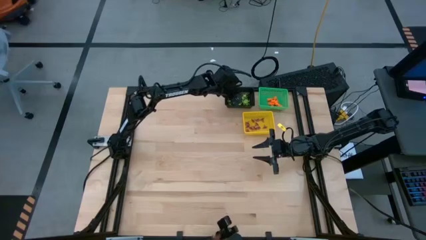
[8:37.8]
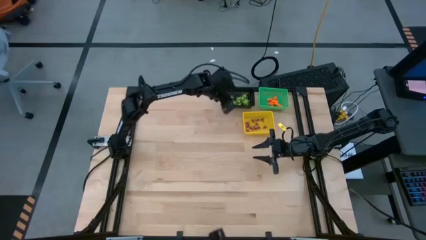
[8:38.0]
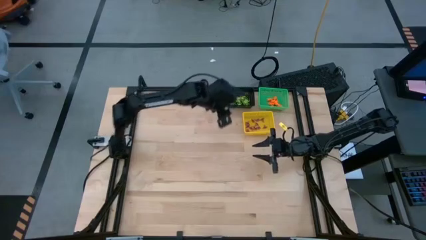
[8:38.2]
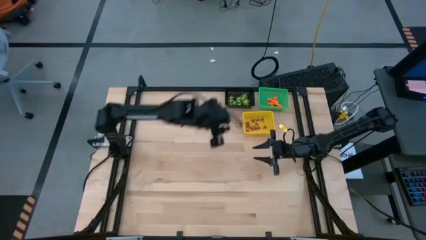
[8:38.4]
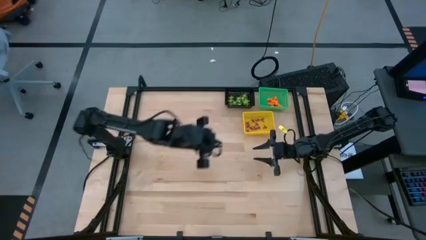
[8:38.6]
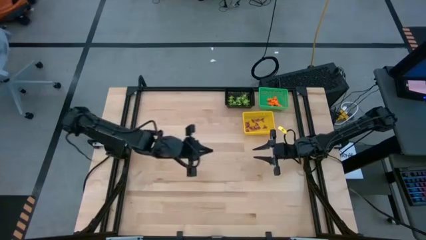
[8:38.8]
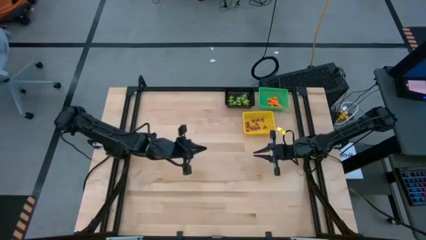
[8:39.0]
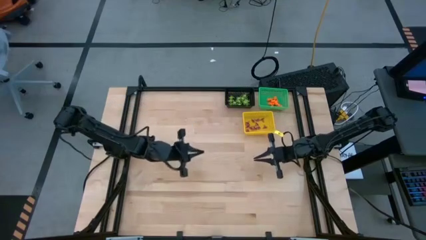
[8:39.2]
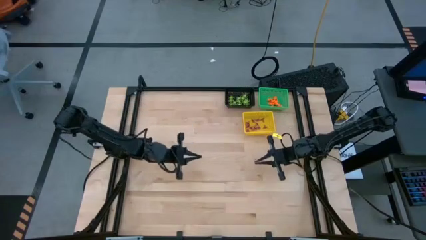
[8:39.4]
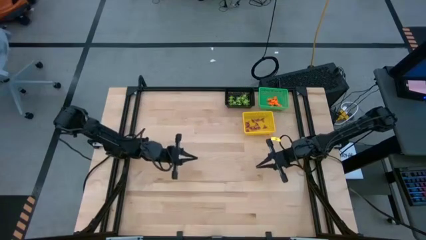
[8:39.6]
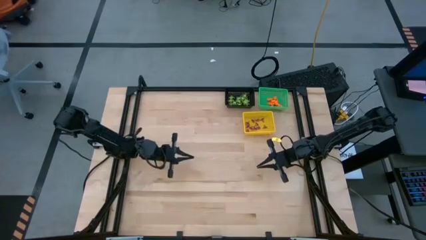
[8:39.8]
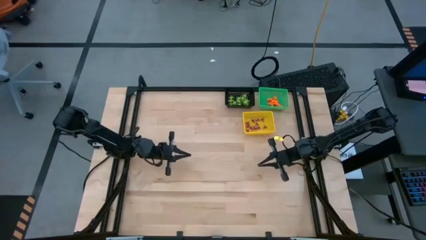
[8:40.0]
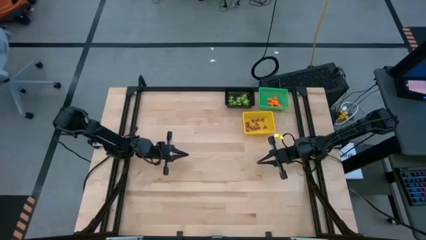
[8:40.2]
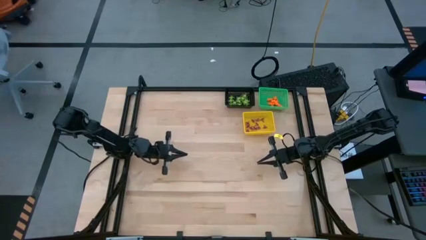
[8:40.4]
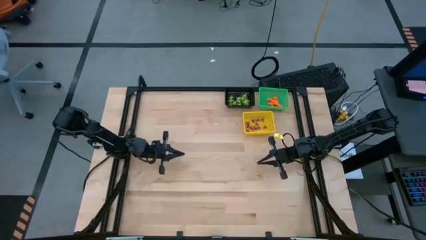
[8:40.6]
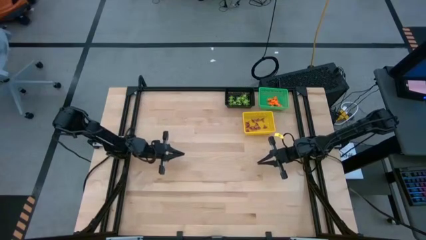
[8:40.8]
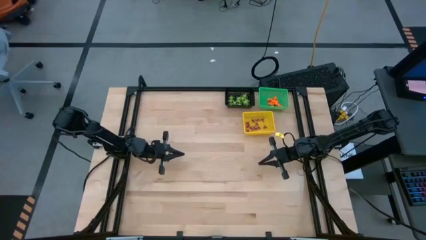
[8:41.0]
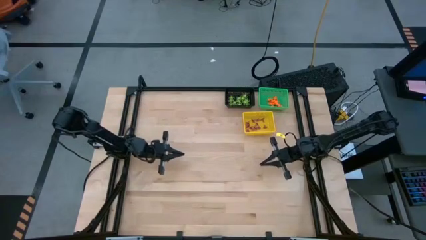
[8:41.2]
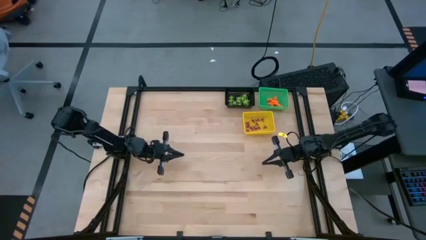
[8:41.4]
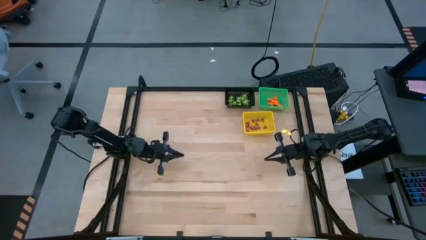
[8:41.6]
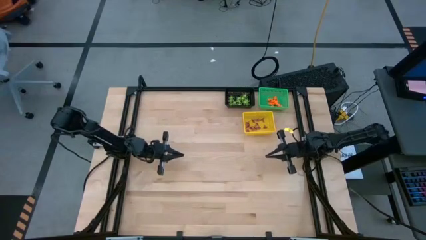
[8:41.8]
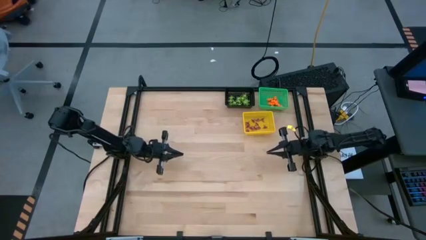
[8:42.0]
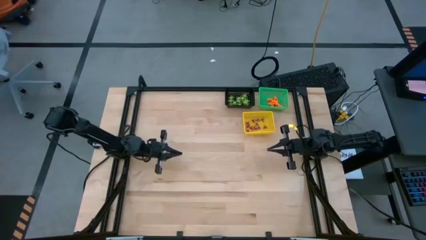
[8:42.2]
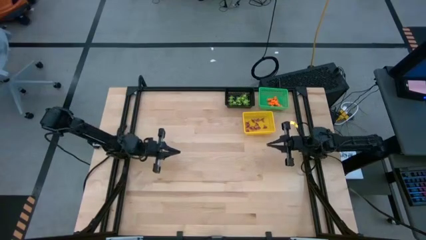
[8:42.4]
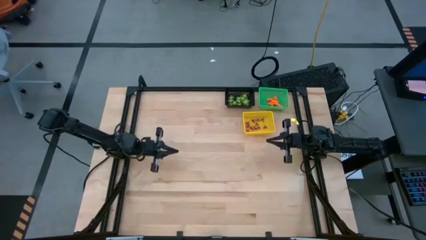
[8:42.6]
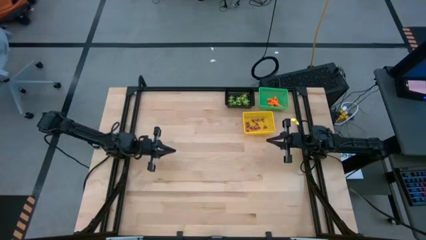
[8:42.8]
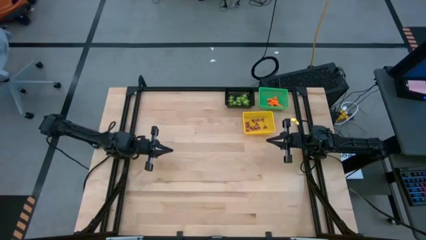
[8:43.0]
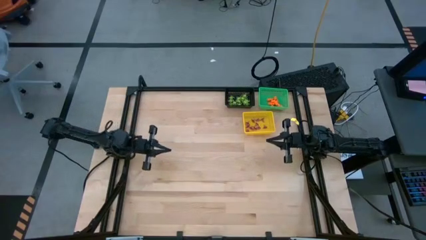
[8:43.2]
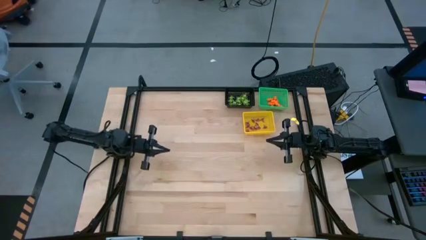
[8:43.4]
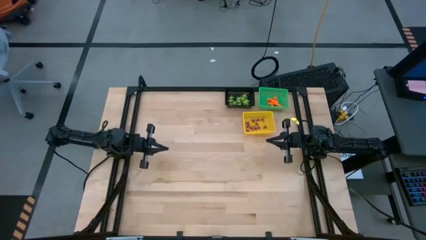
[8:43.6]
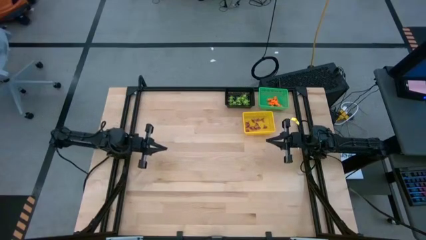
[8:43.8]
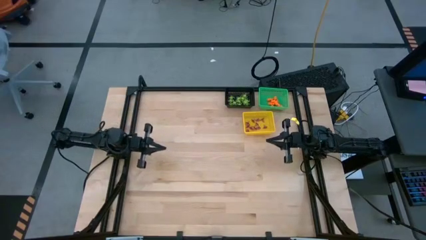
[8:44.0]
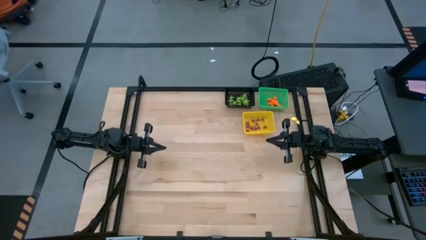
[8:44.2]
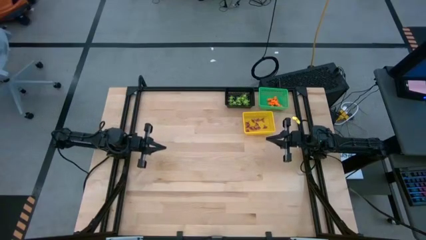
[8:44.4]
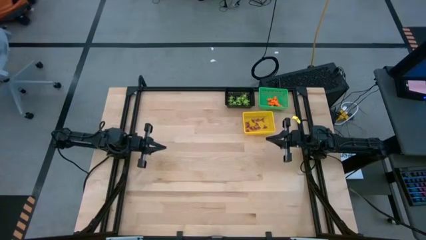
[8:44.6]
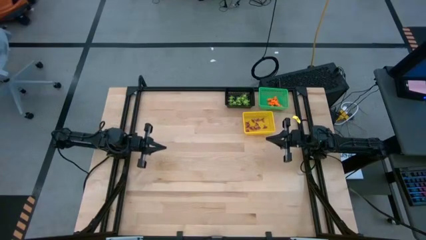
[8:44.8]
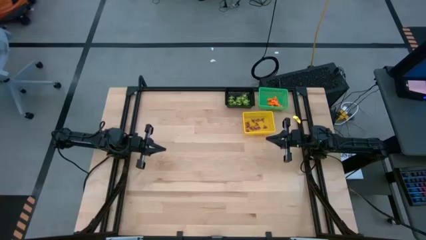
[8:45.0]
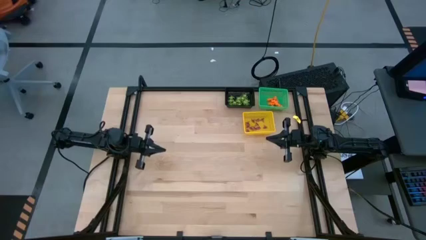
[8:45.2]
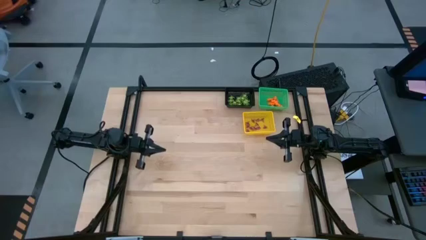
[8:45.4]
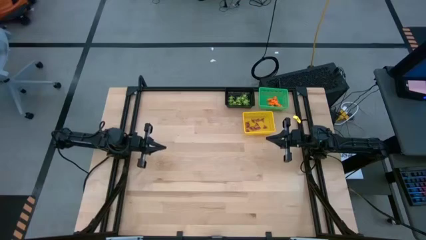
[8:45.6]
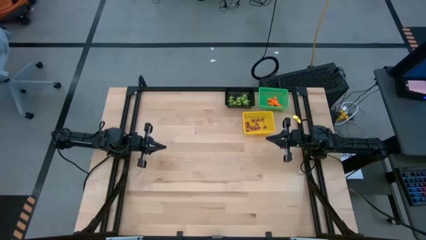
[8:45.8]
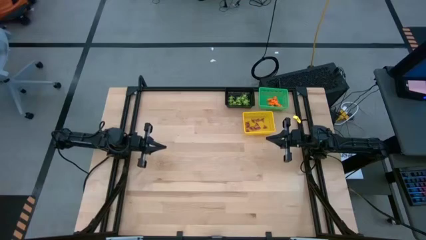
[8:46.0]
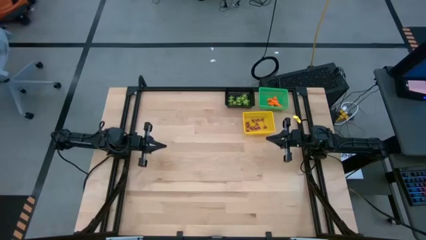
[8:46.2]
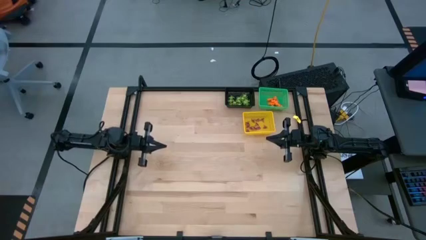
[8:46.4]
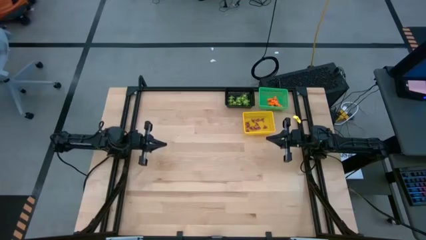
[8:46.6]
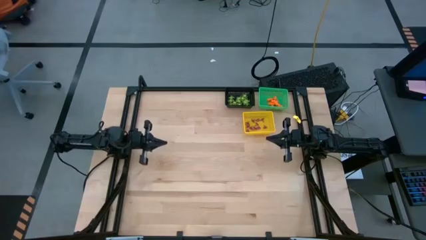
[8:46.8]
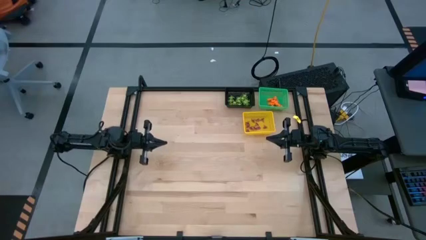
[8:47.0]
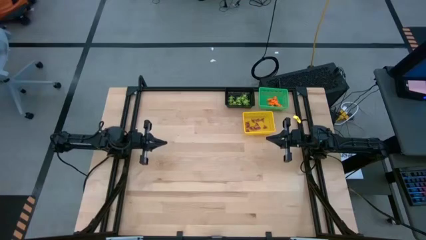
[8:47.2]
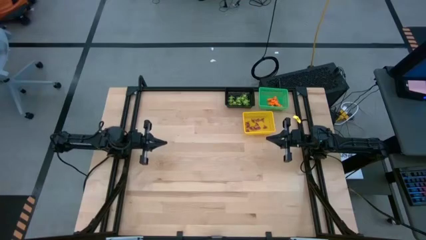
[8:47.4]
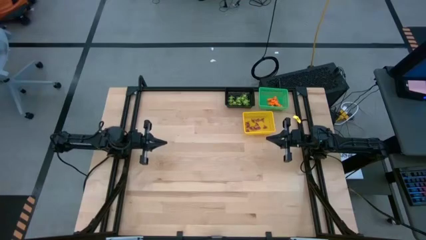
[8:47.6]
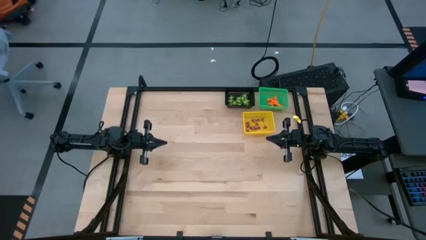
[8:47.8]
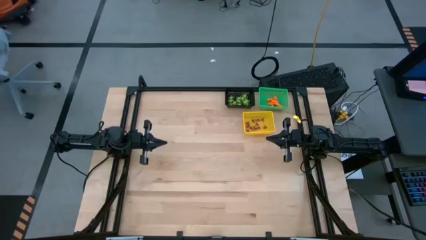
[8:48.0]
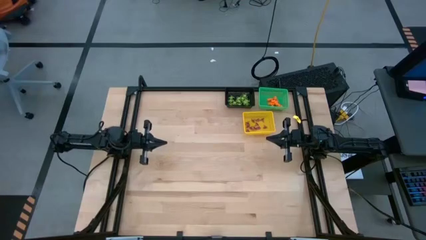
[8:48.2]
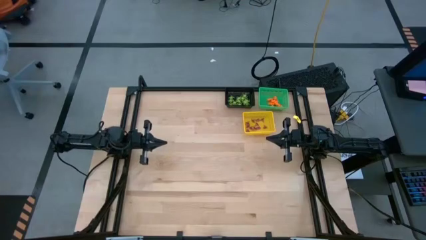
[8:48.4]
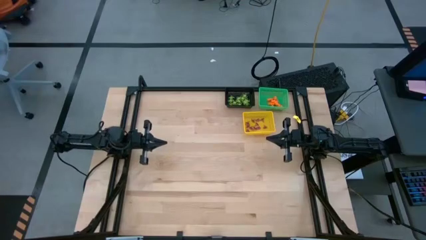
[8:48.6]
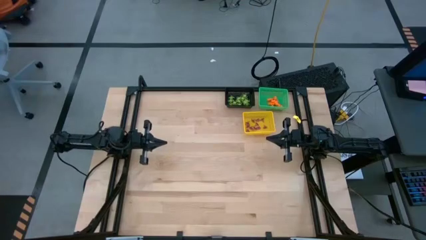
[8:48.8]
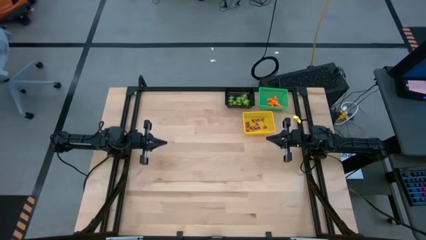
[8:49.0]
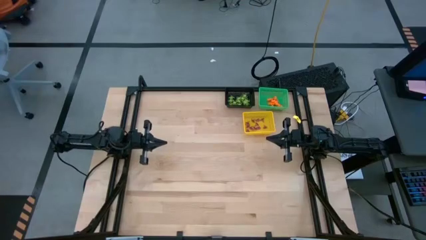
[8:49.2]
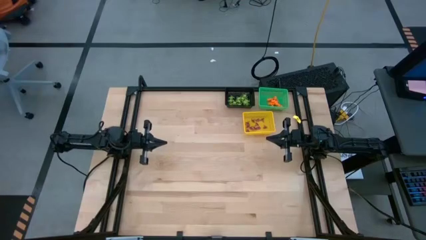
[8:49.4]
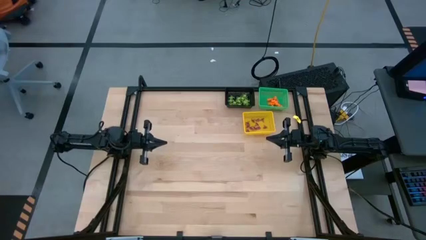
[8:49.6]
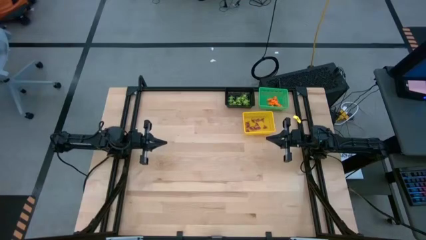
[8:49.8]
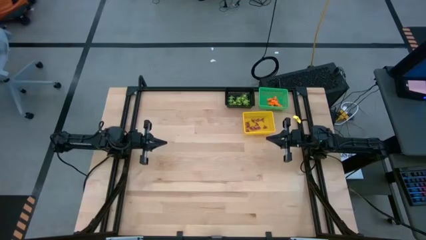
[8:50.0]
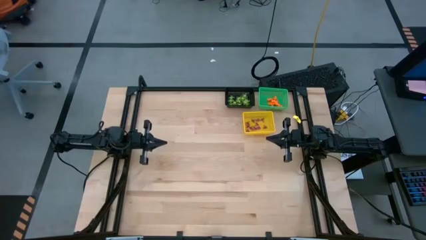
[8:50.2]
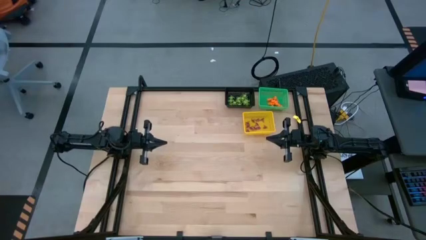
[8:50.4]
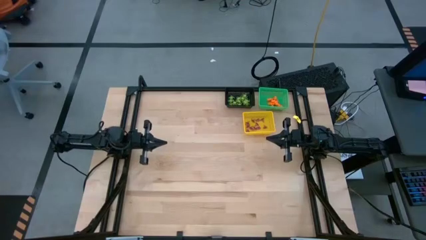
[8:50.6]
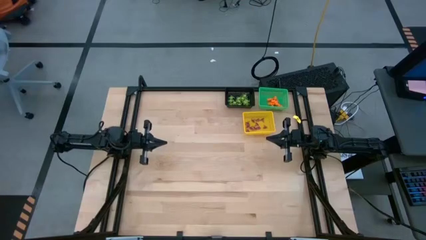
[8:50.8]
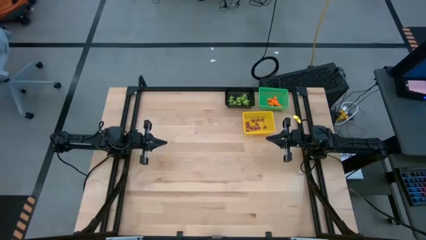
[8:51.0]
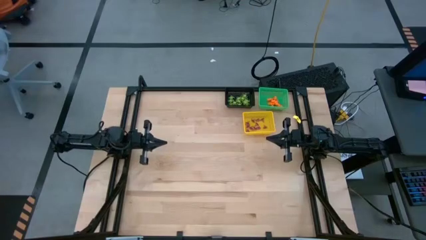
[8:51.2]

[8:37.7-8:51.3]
Task: Sort Halloween decoration
Return to Home Position

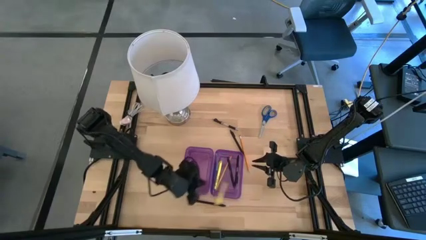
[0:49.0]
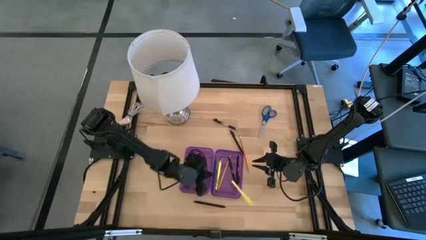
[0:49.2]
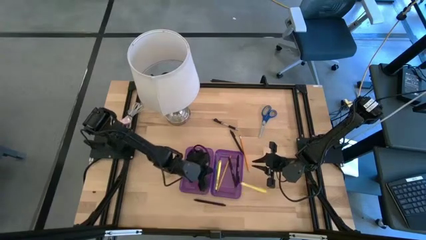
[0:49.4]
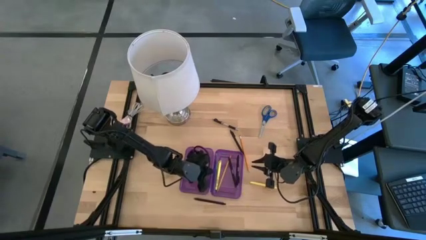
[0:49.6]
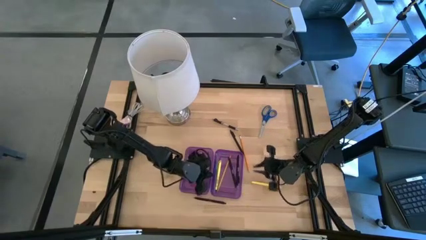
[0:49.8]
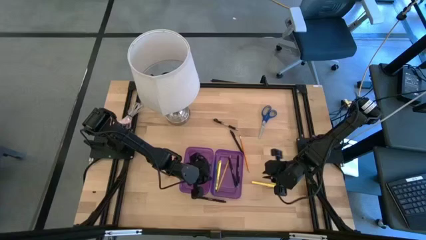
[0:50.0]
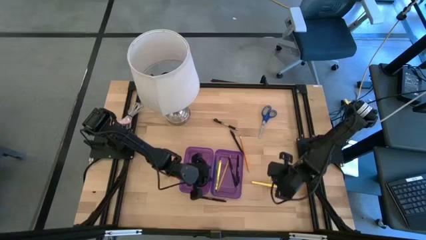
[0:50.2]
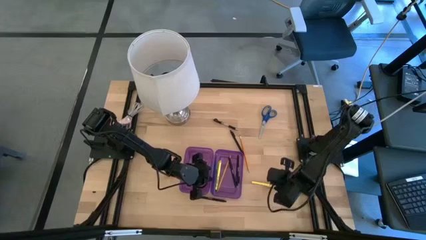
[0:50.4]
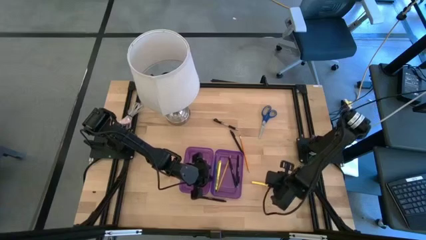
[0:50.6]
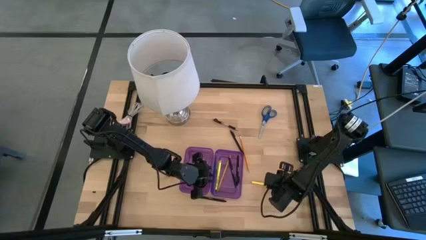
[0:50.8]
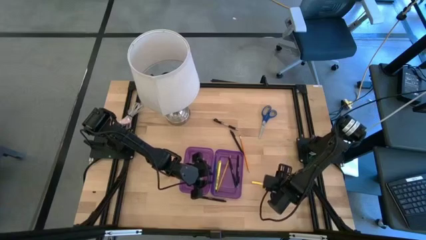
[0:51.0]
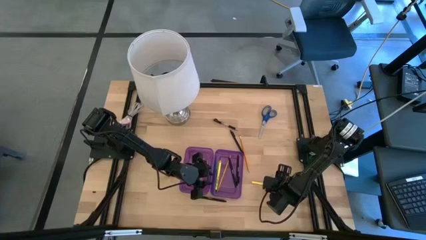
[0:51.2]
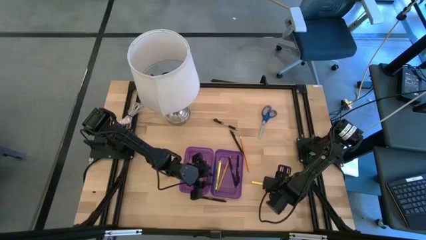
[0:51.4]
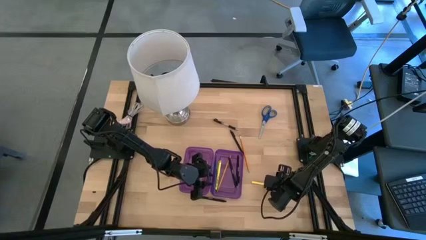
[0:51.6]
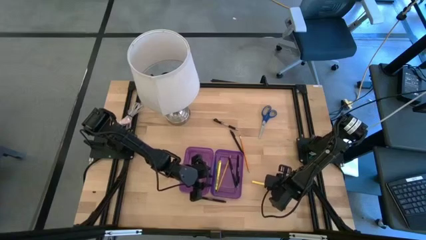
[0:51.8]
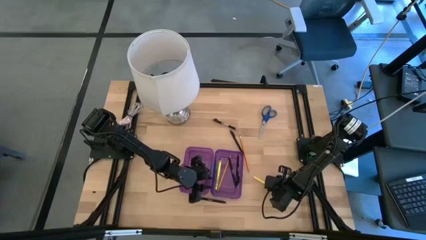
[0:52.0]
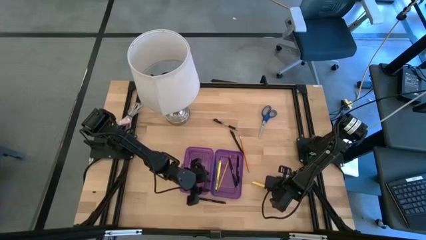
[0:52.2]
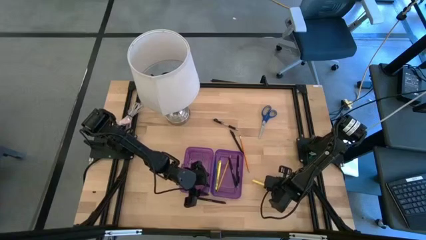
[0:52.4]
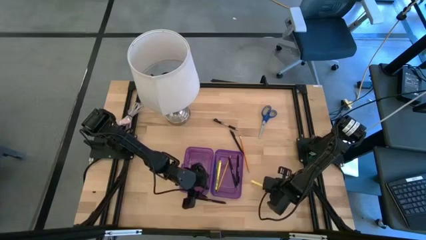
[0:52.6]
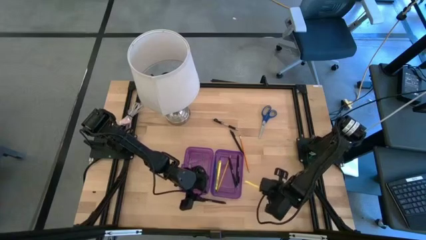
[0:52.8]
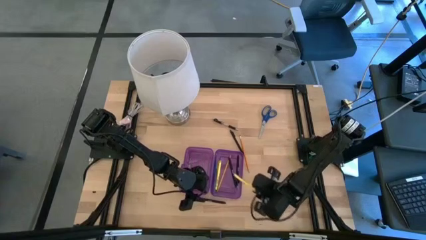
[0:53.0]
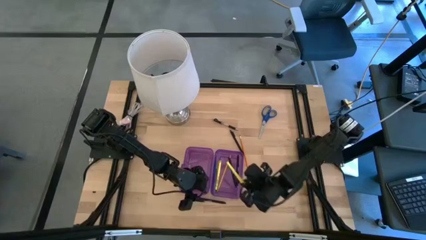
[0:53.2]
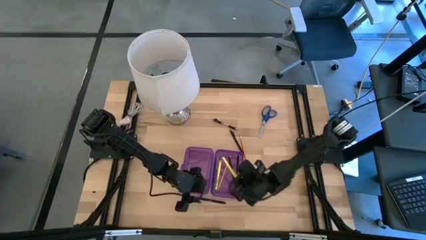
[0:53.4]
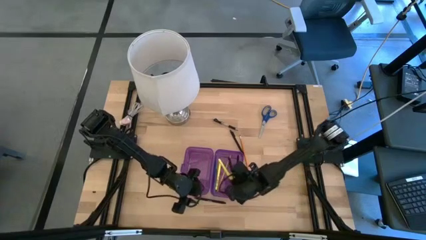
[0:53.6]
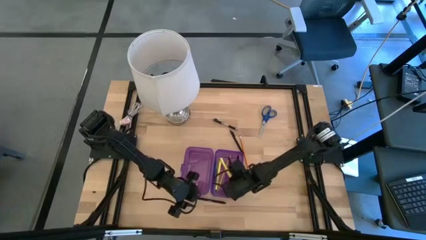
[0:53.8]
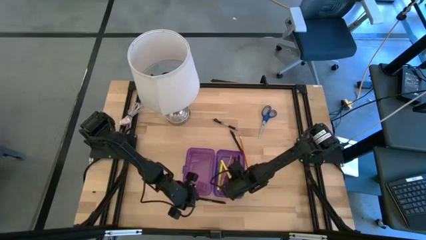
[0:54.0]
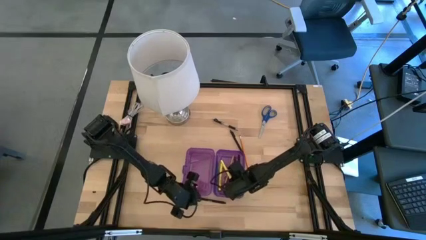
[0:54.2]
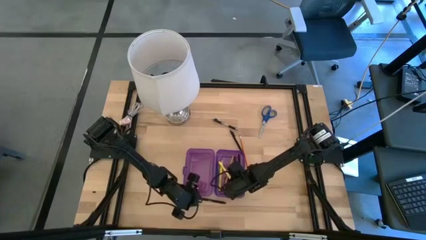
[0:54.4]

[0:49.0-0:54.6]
Task: Pick & place school supplies into a supply box
Put the yellow pencil into the purple supply box
